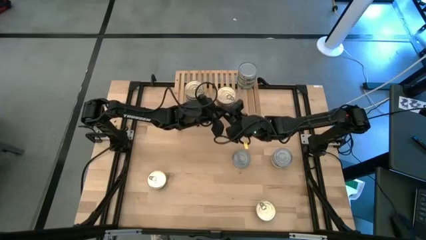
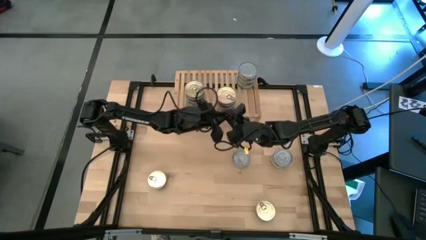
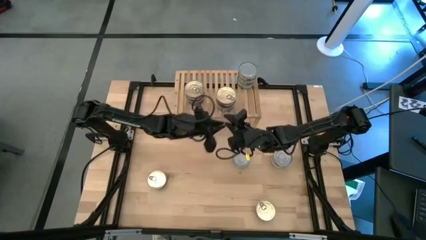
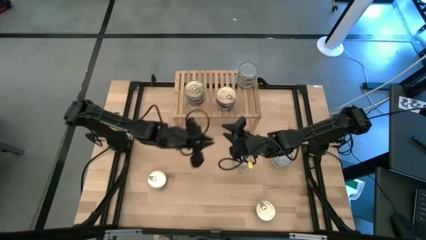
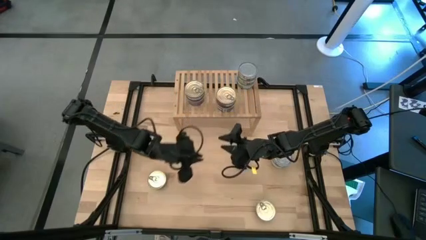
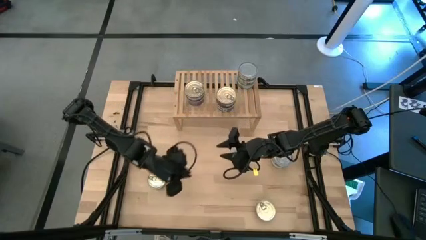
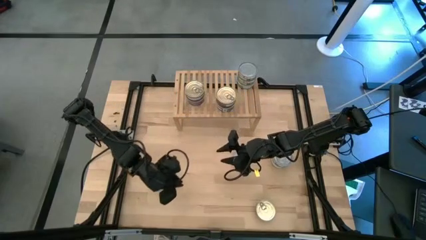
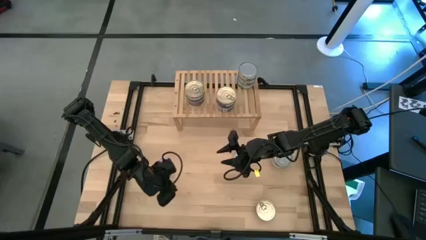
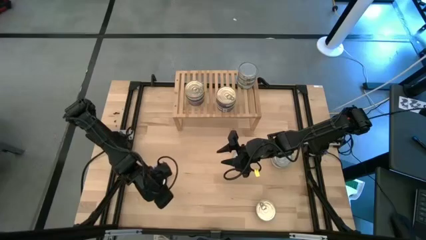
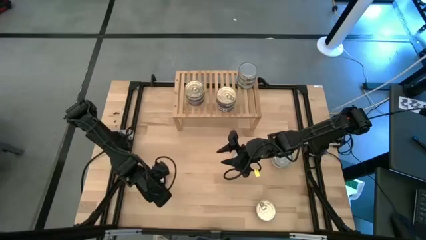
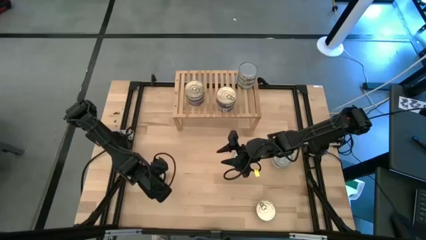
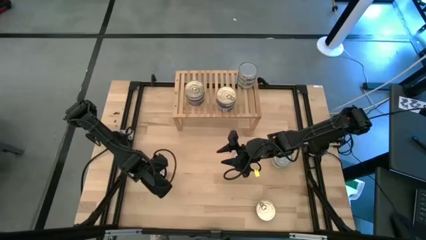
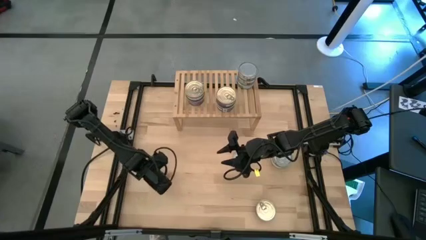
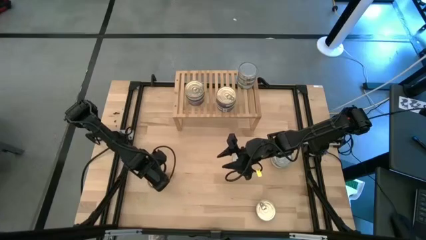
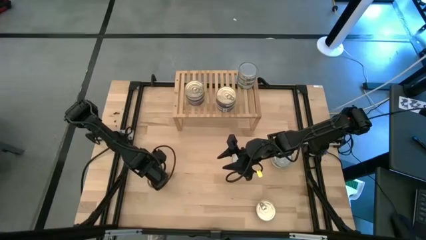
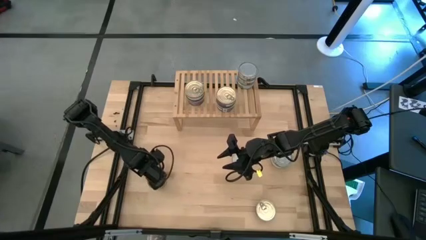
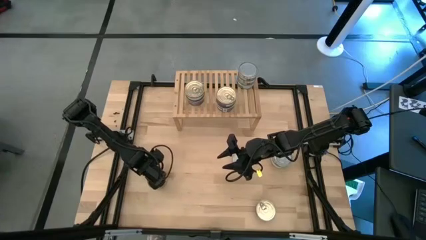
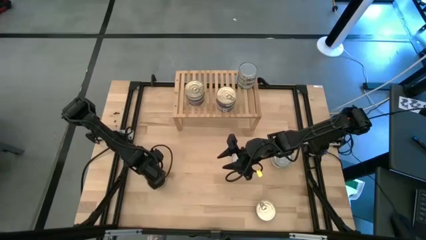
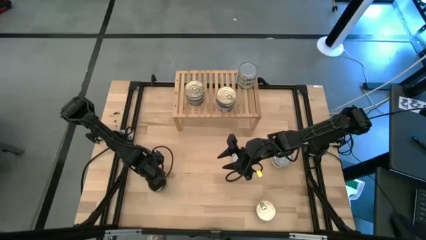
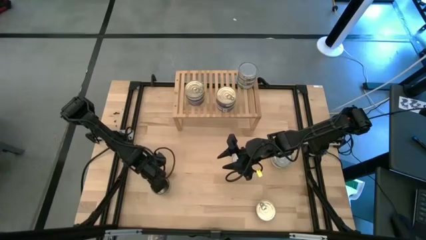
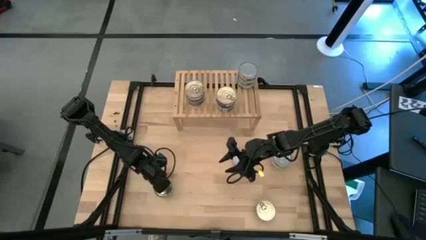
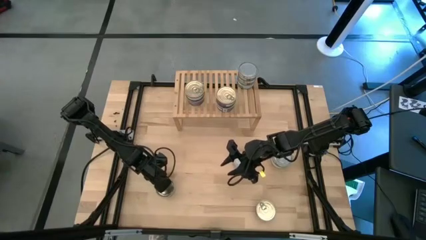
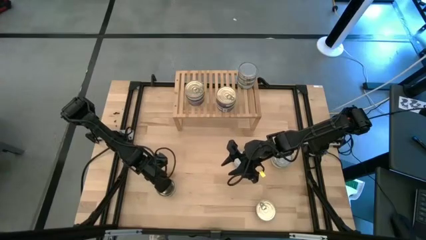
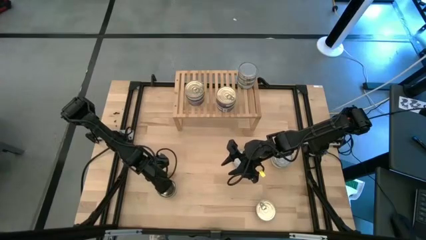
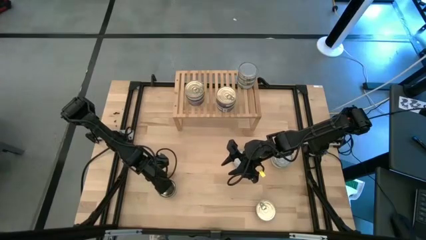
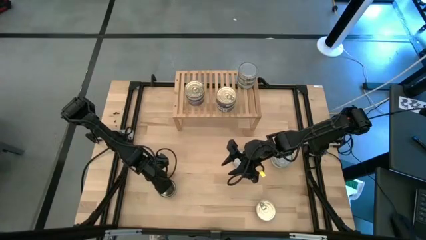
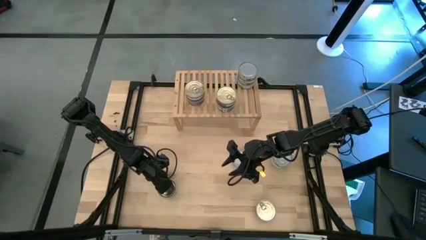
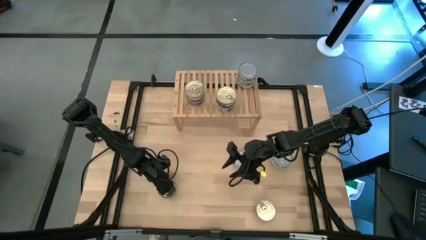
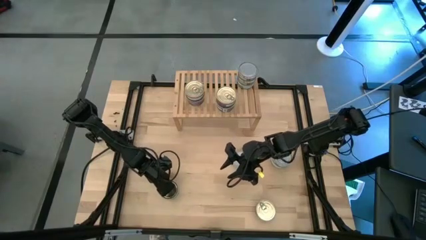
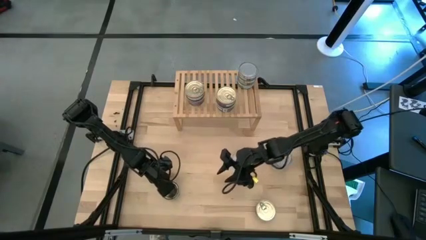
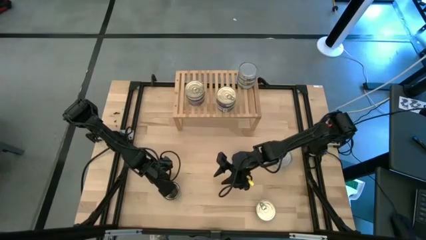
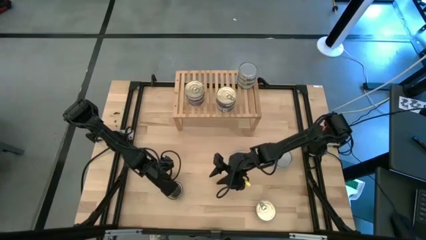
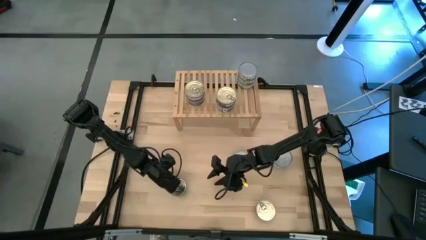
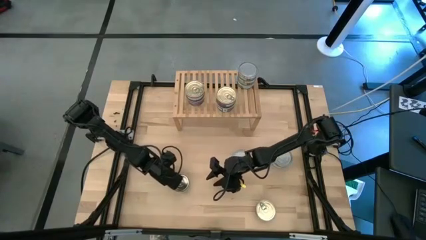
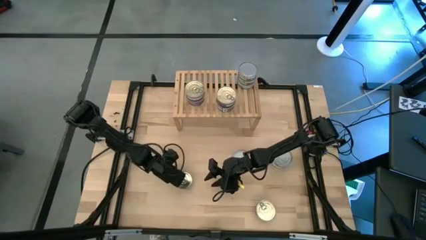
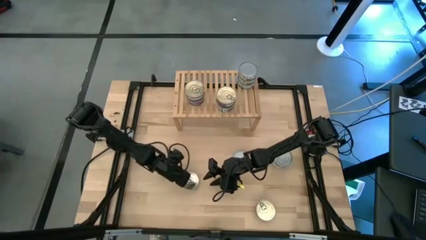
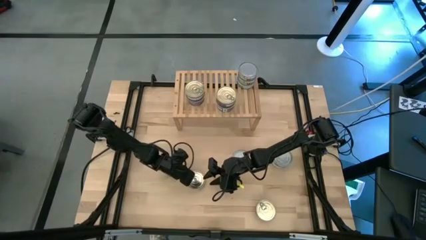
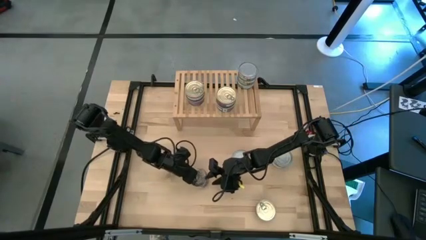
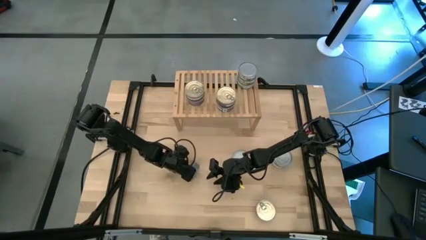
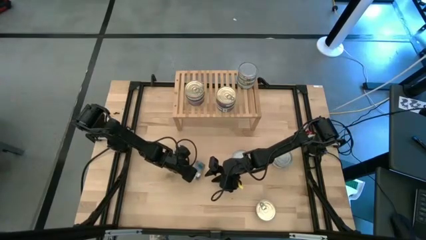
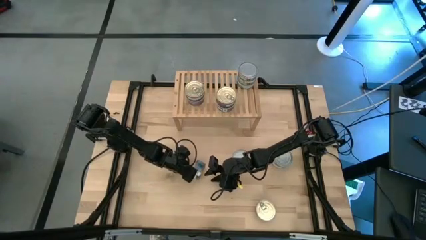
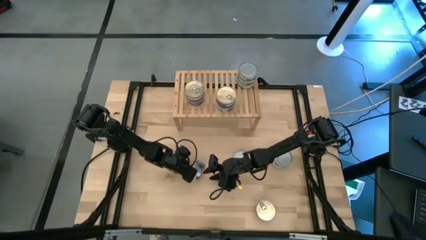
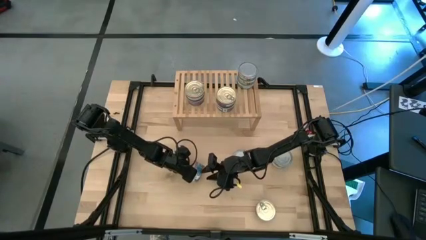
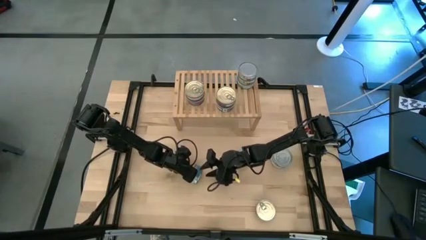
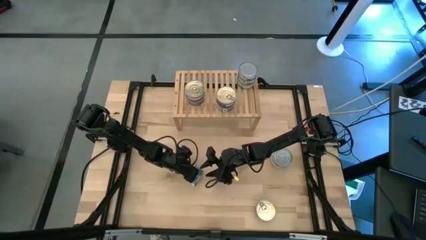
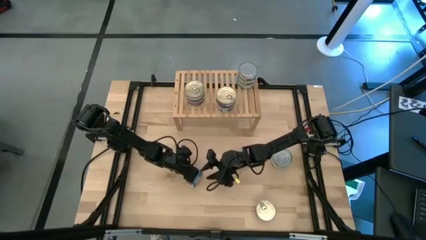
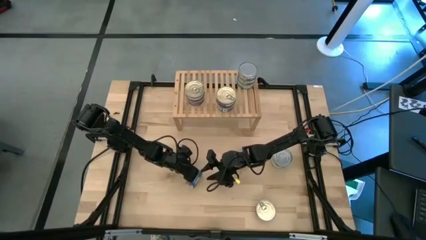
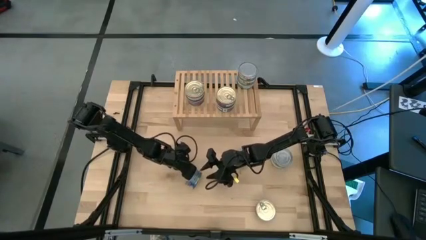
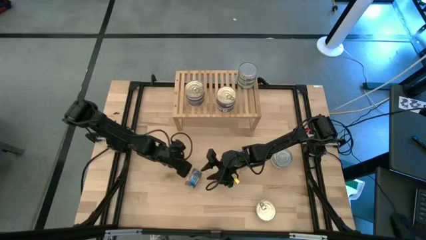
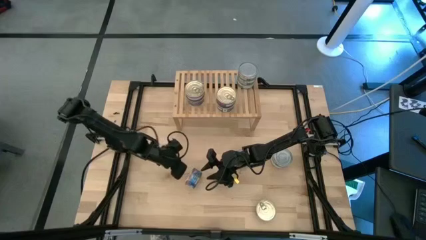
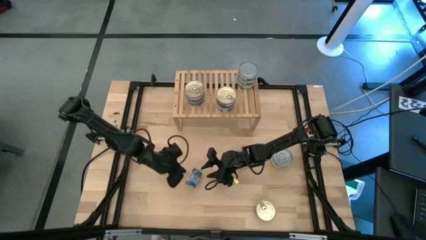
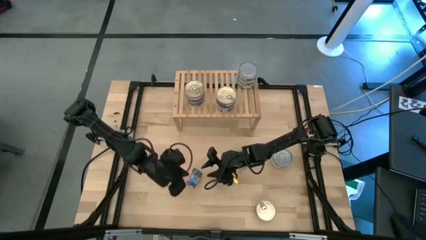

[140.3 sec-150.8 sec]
Task: Stack canned seafood by type on shelf
Stack the blue tuna can on top of the blue tuna can on the shelf
